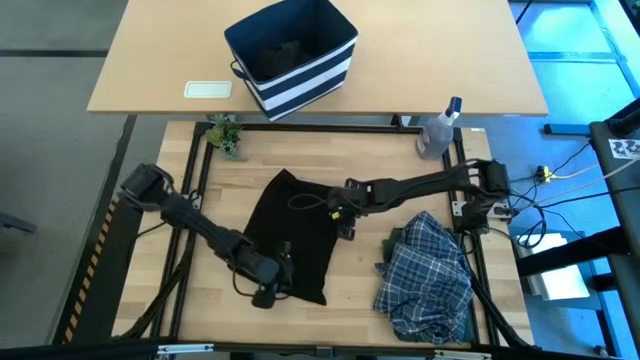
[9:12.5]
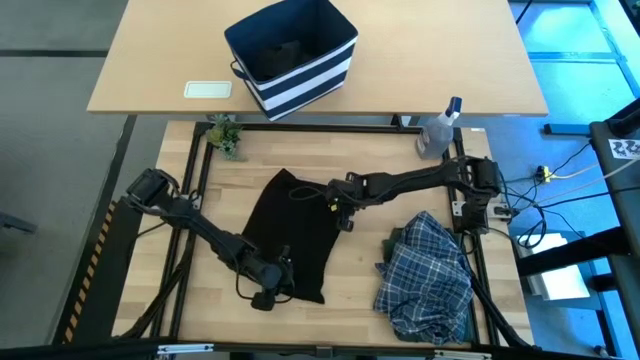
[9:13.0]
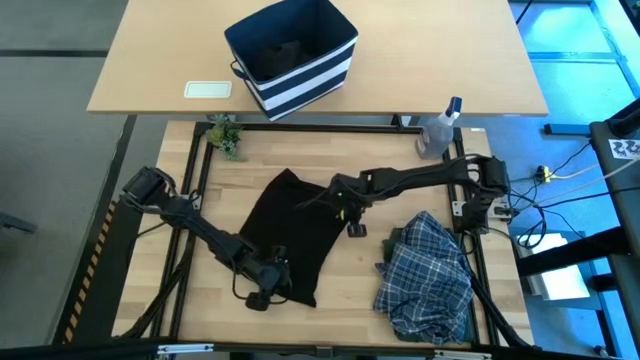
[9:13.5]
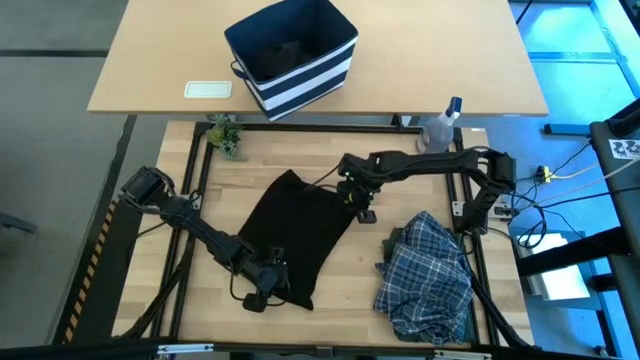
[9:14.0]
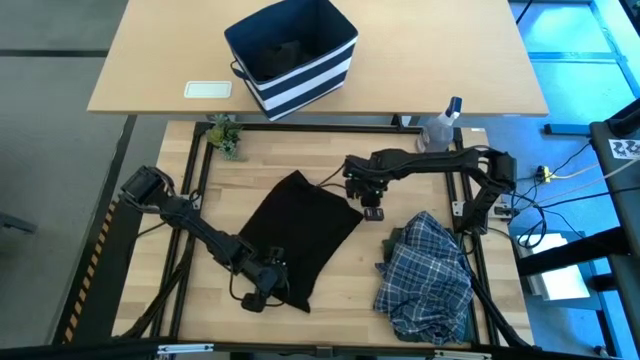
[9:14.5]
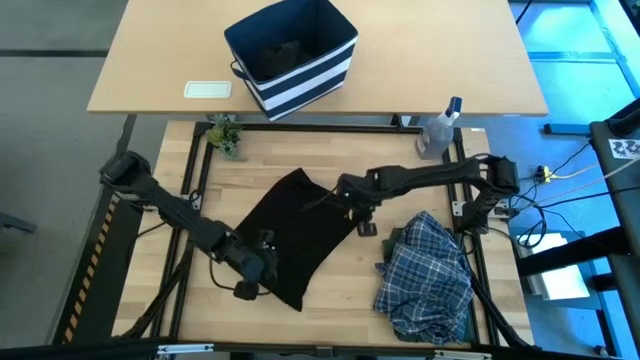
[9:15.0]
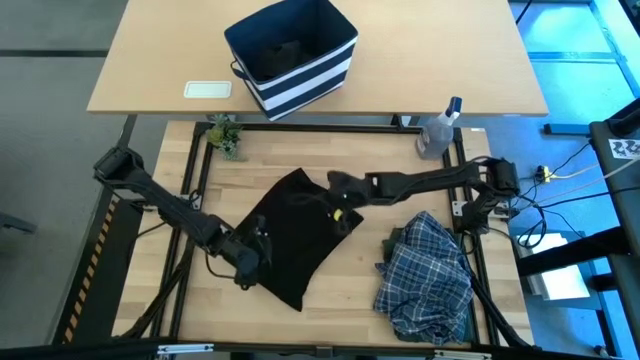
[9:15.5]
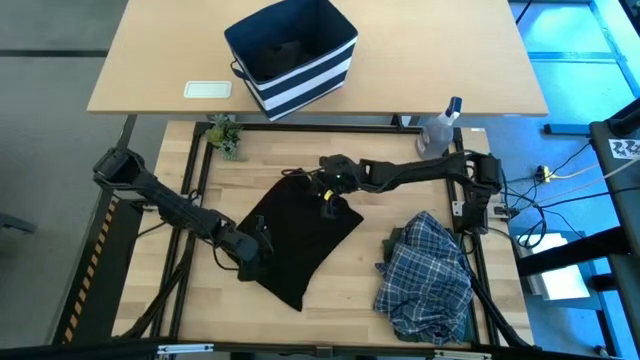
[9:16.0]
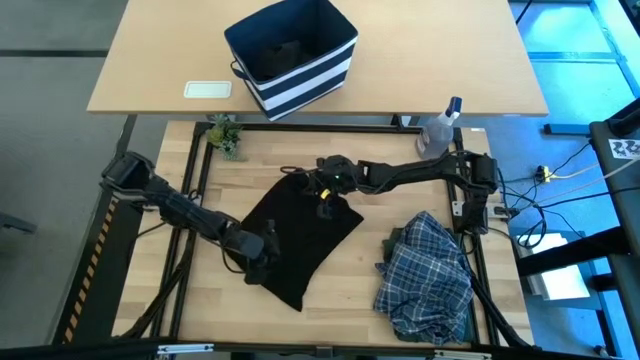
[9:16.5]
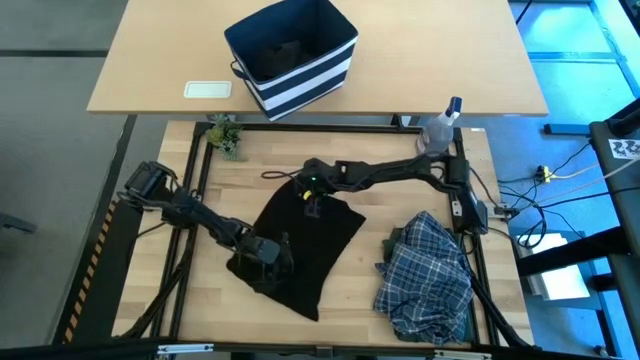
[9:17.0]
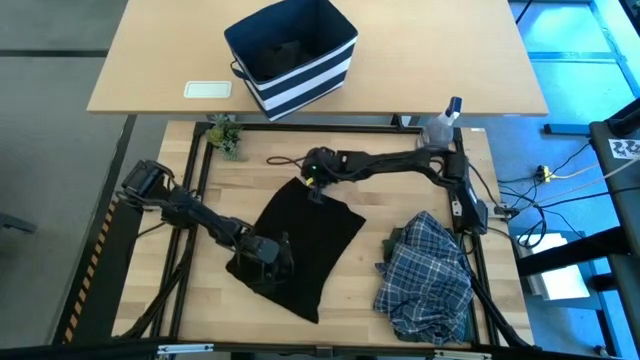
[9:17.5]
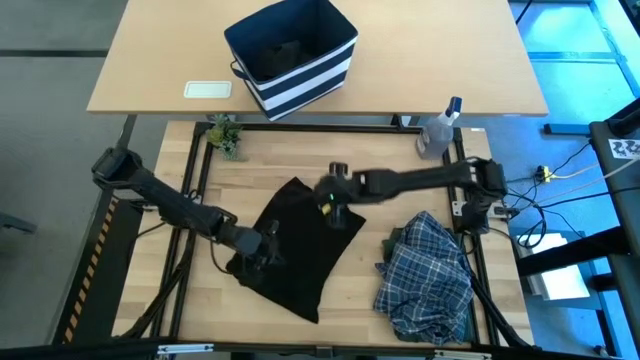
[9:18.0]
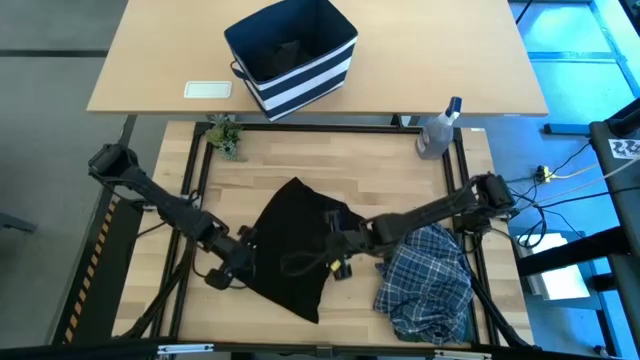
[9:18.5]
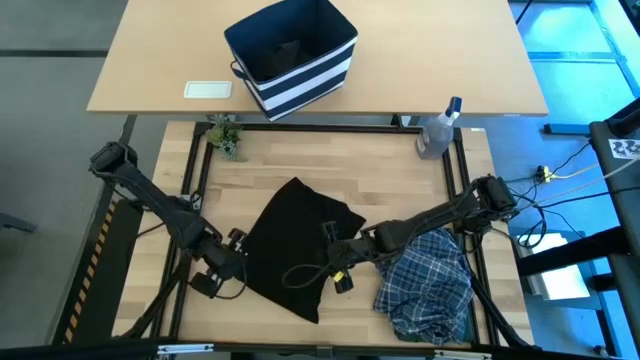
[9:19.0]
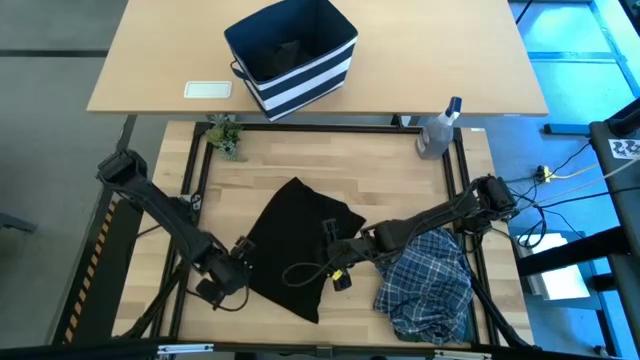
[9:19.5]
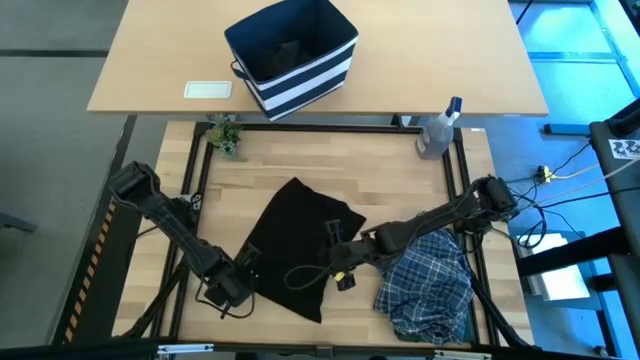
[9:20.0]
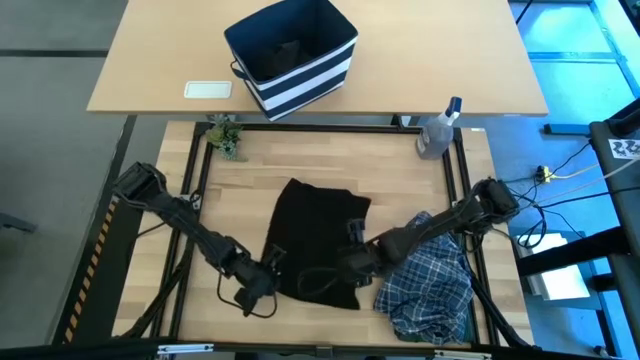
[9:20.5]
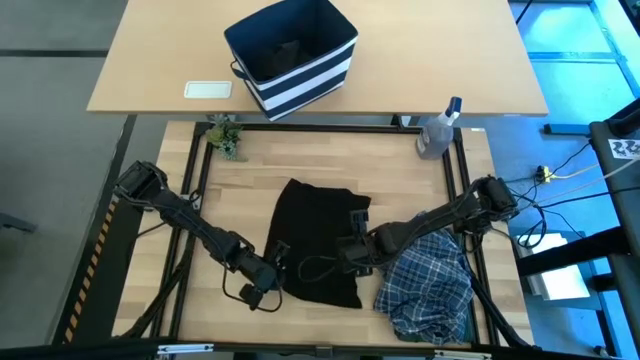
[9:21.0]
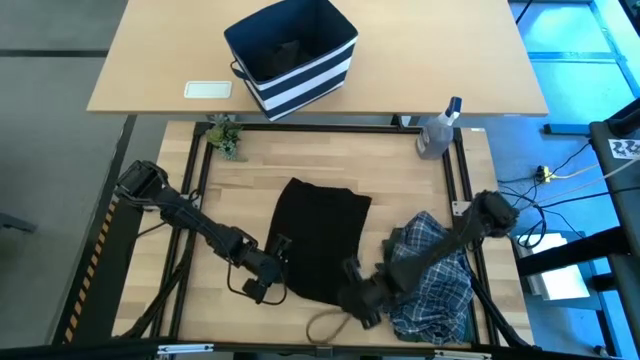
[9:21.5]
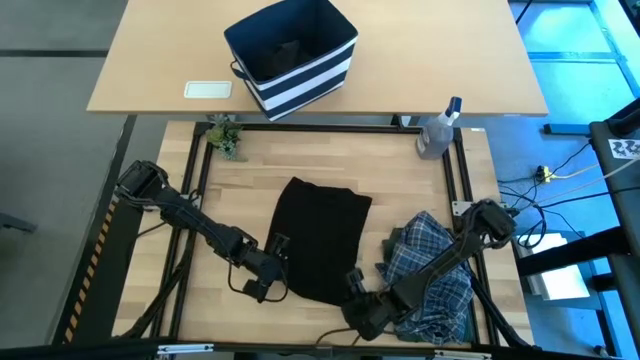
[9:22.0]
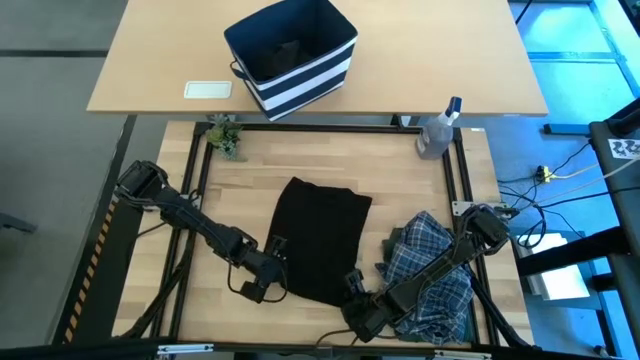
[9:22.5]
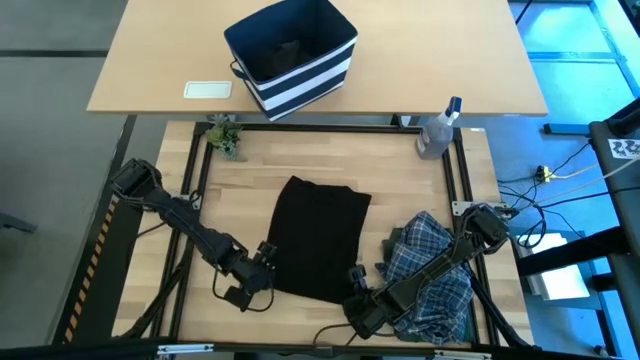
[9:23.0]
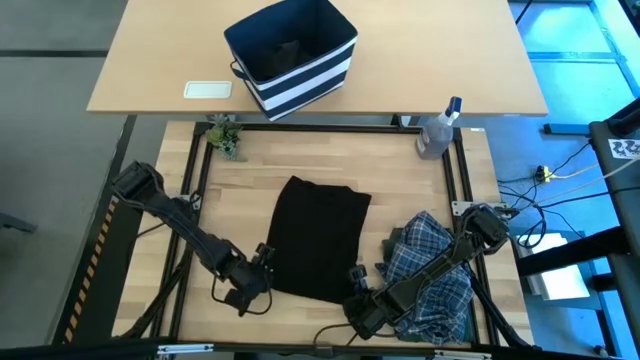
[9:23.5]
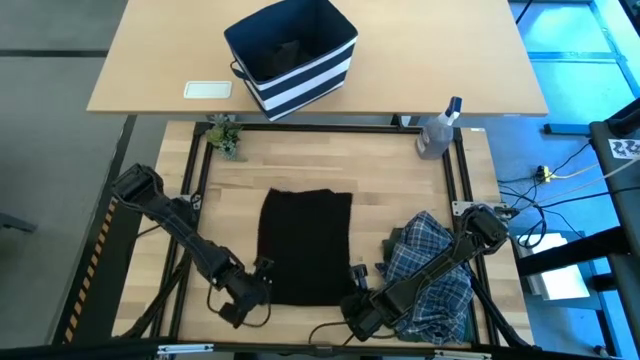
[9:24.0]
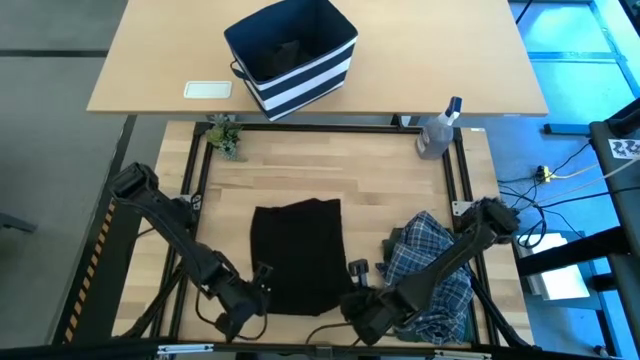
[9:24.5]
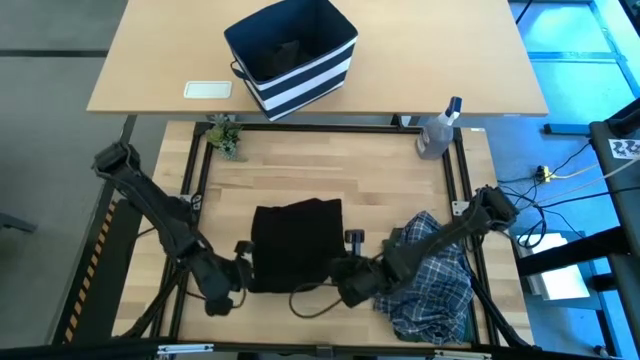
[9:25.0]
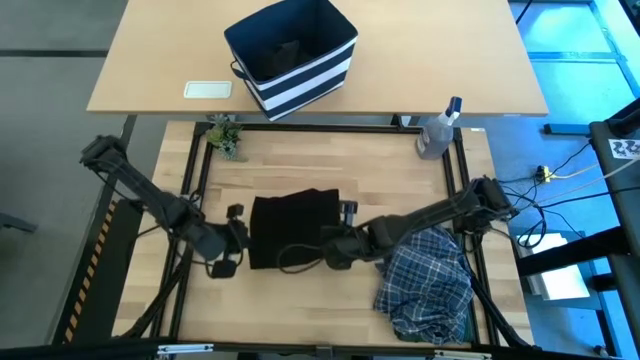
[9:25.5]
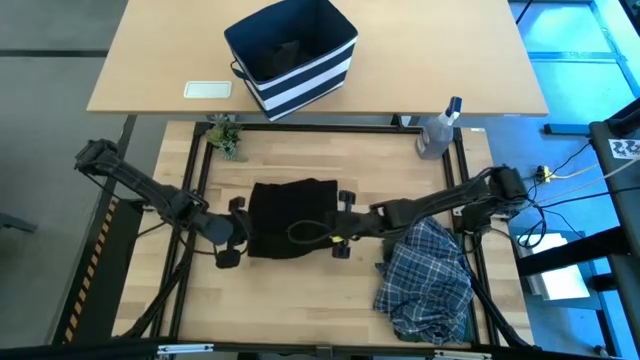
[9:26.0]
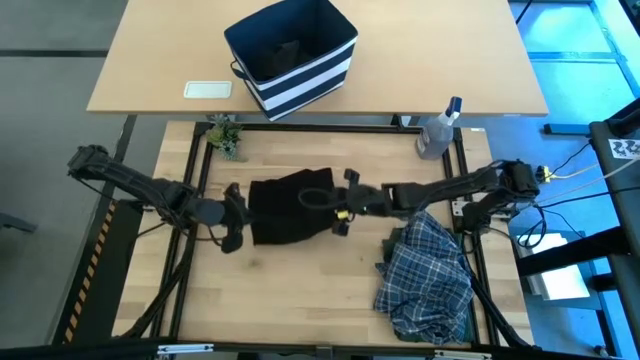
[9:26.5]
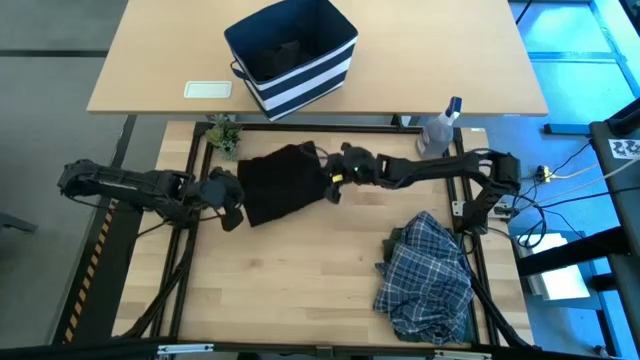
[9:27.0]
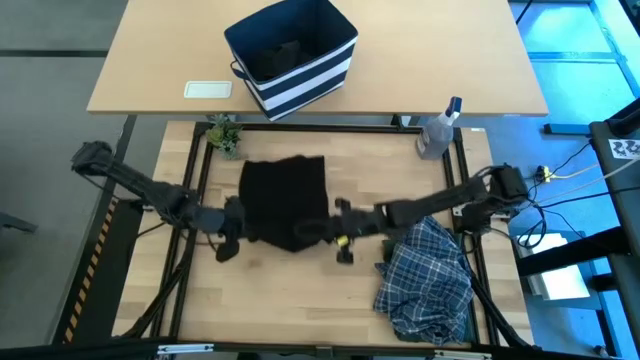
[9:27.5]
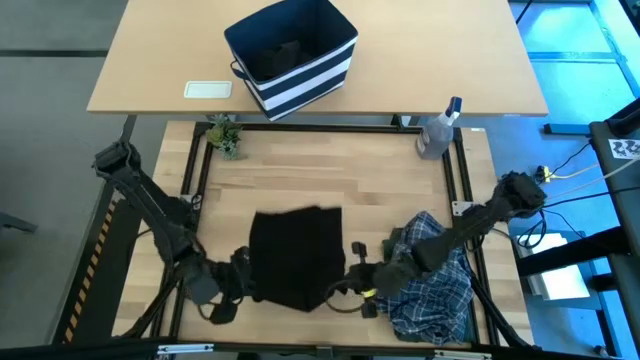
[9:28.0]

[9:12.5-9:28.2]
Task: Fold Laundry from Bin
Fold the black shirt

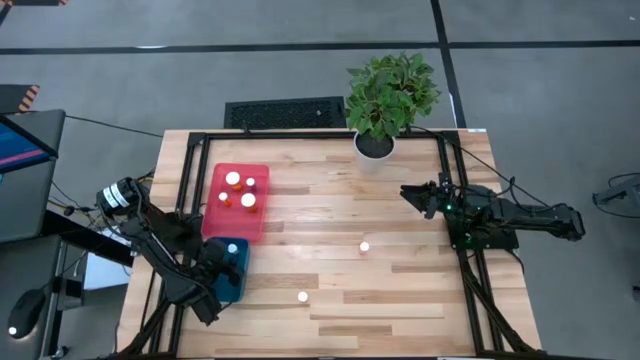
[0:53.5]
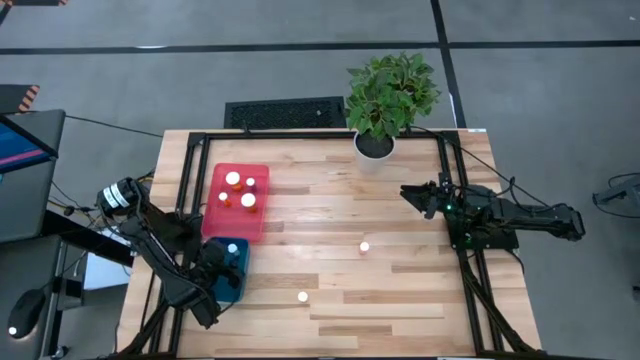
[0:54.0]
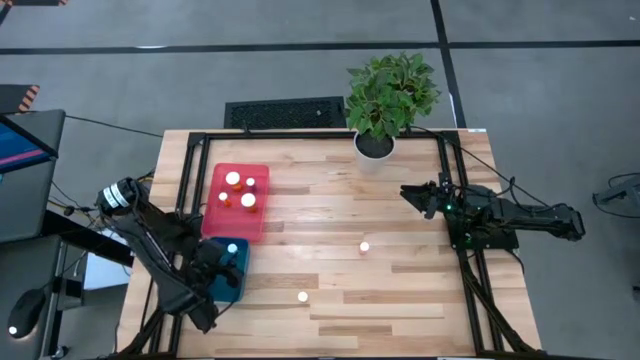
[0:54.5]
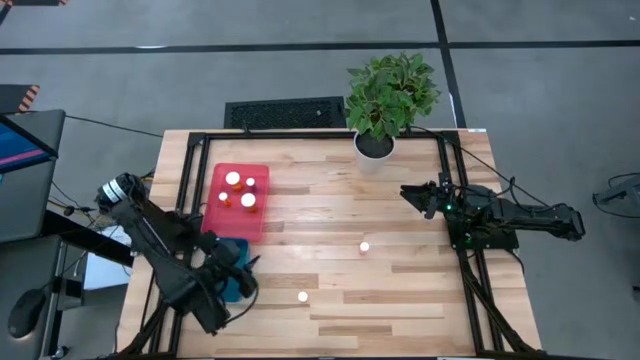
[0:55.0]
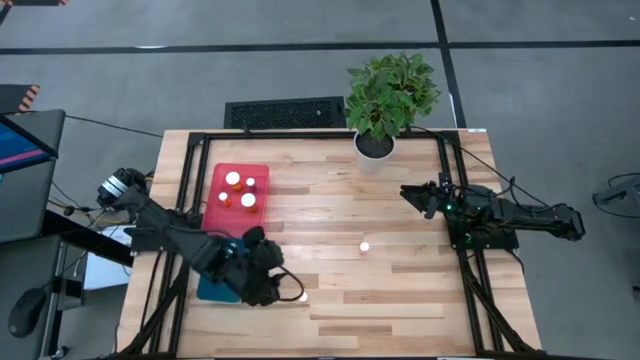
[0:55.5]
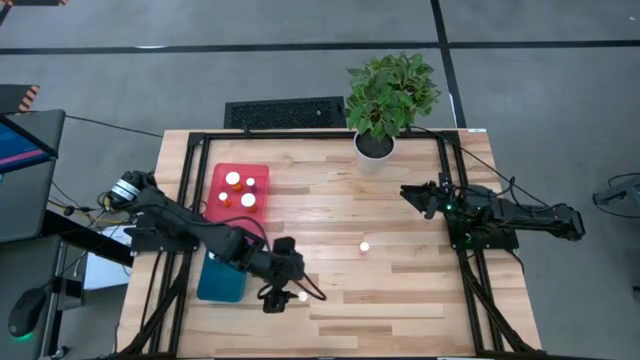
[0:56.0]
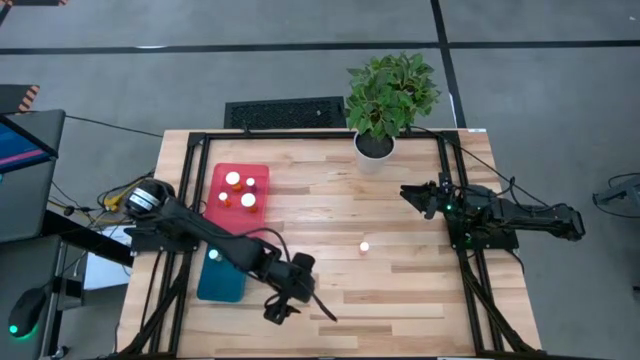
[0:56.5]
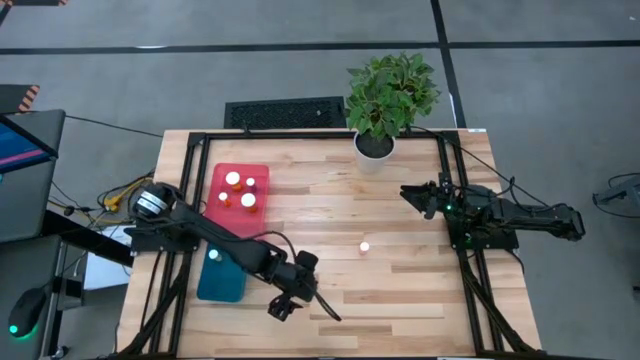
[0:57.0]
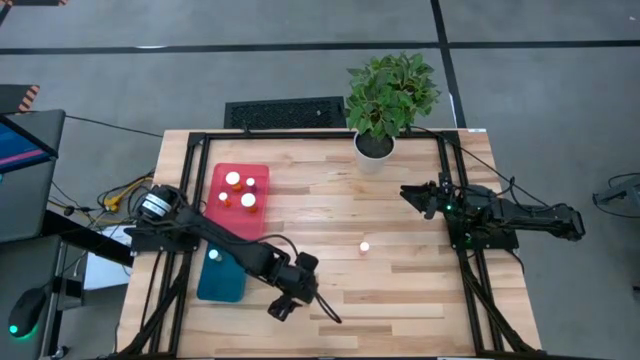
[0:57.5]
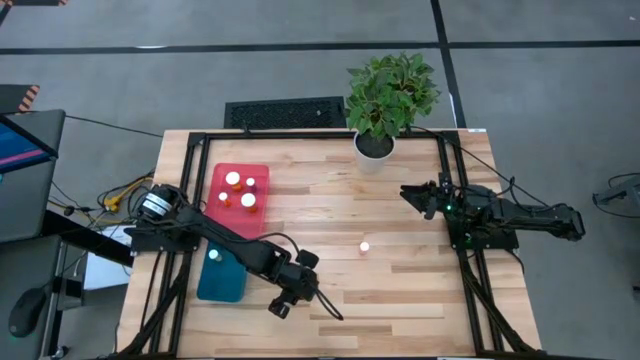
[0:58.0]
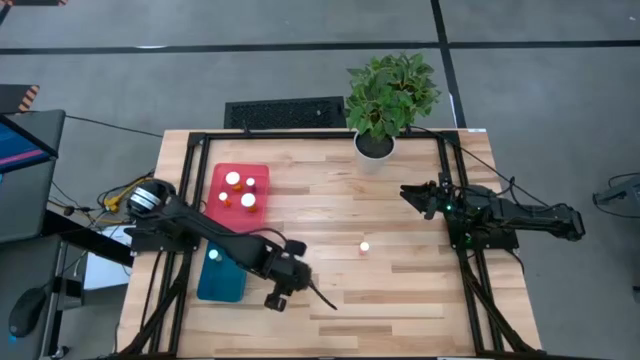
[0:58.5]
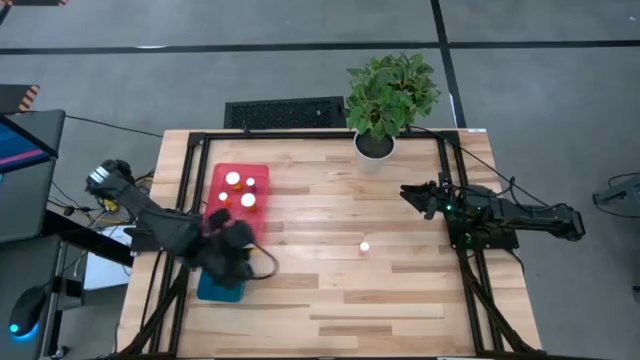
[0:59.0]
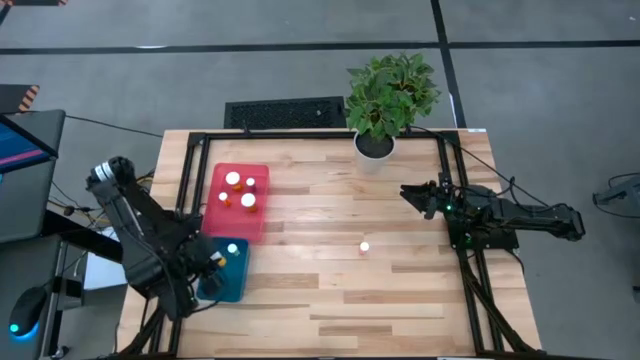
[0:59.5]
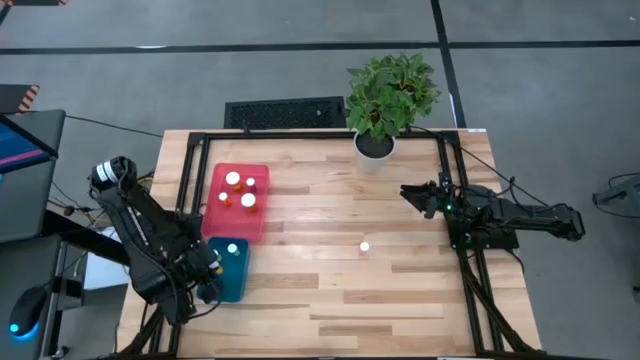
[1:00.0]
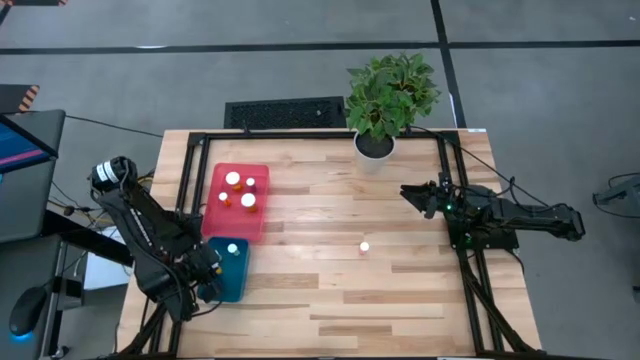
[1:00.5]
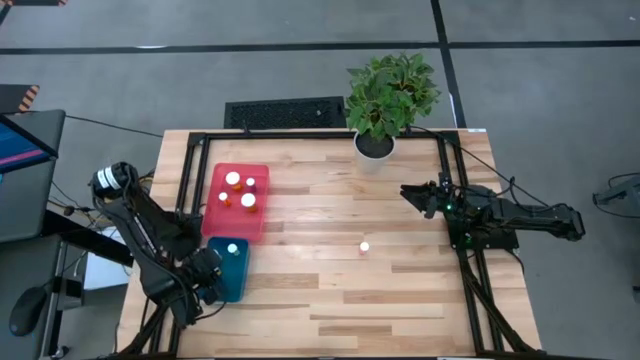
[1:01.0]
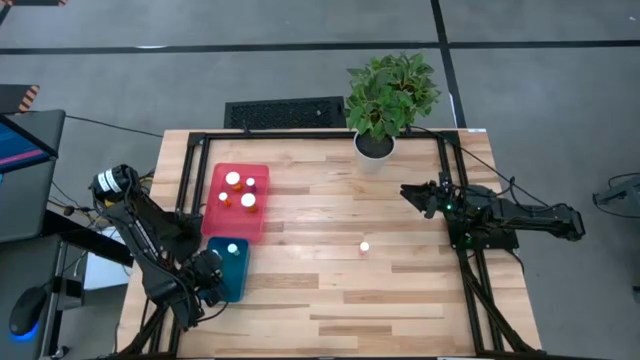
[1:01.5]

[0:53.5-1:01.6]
Task: Pick and place medicine bottles into bin by pill shape (circle, oval)
Put the orange tablet bottle into the blue bin
